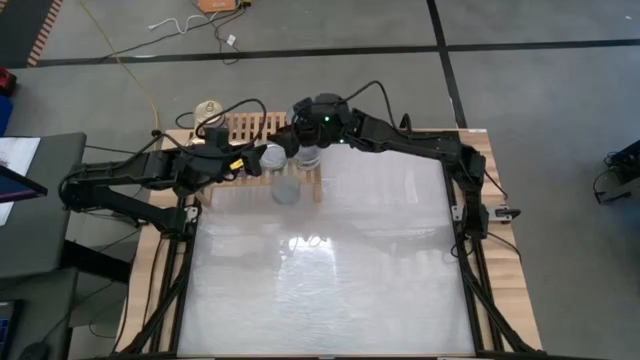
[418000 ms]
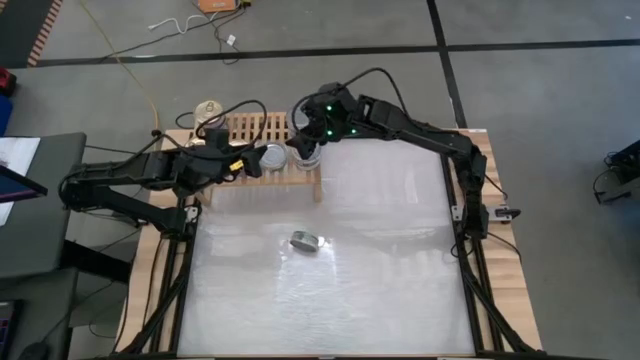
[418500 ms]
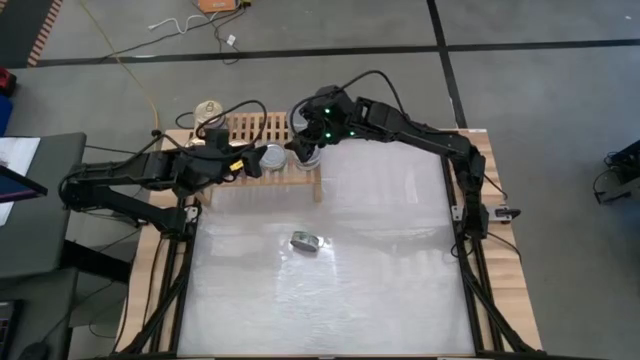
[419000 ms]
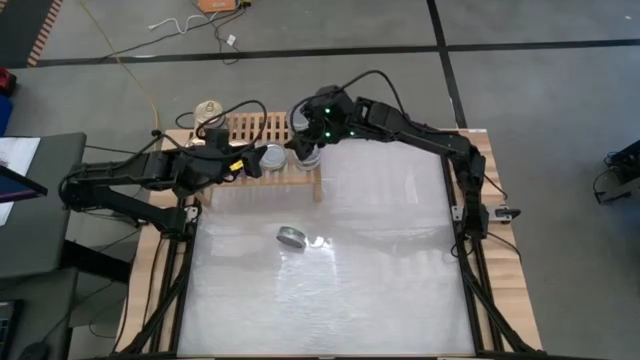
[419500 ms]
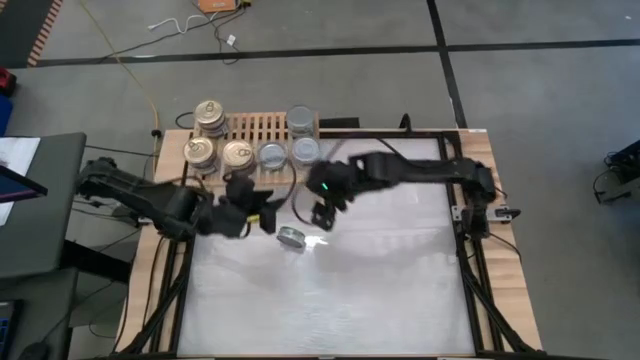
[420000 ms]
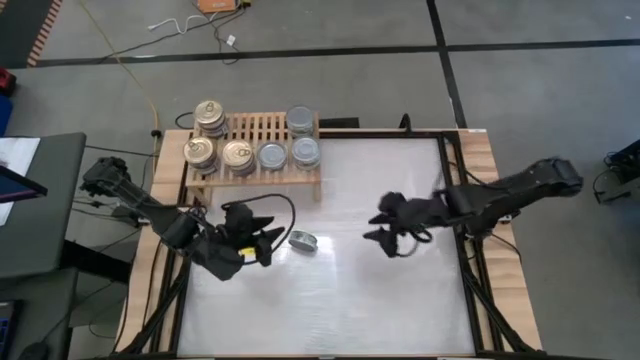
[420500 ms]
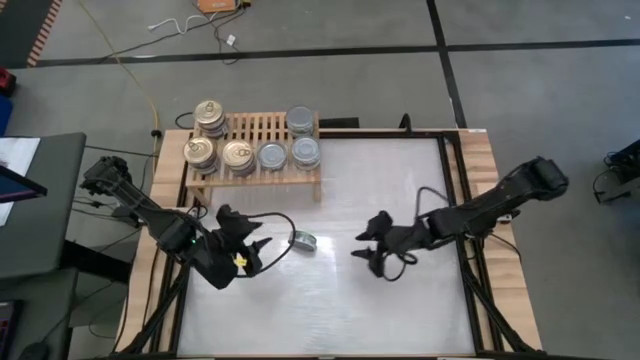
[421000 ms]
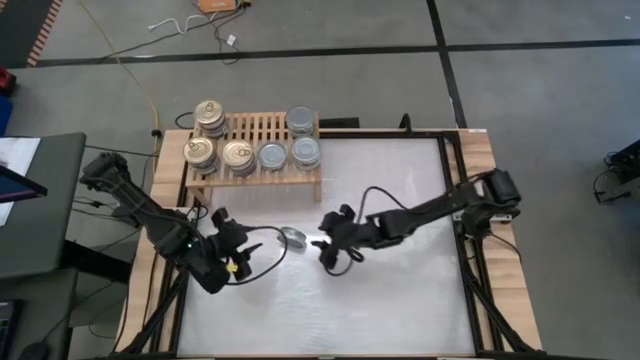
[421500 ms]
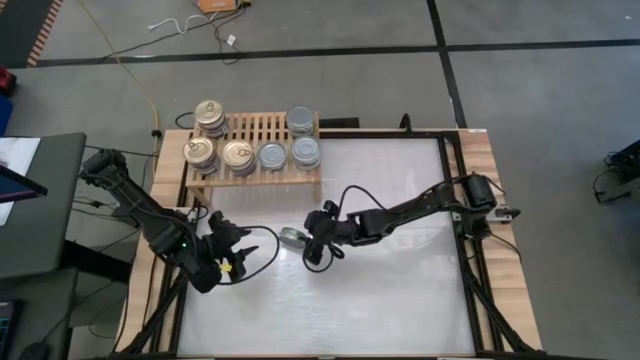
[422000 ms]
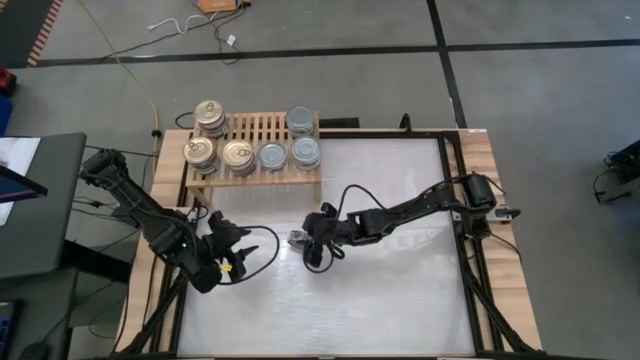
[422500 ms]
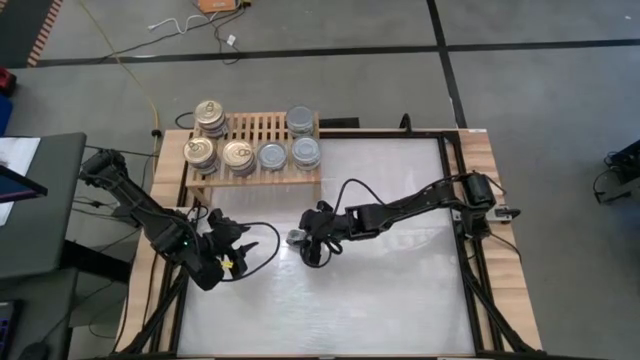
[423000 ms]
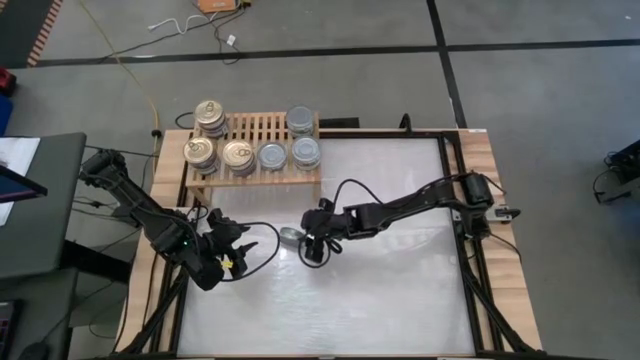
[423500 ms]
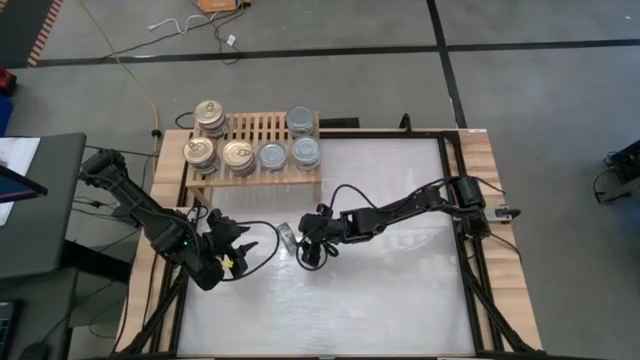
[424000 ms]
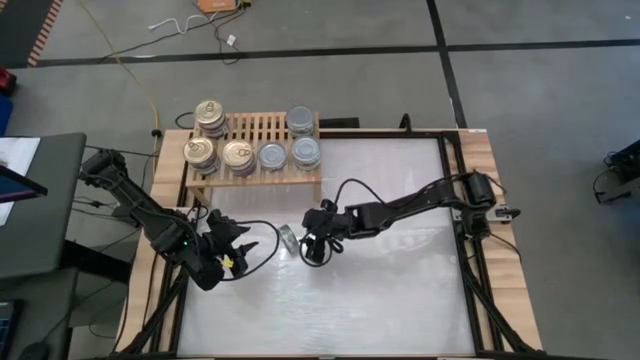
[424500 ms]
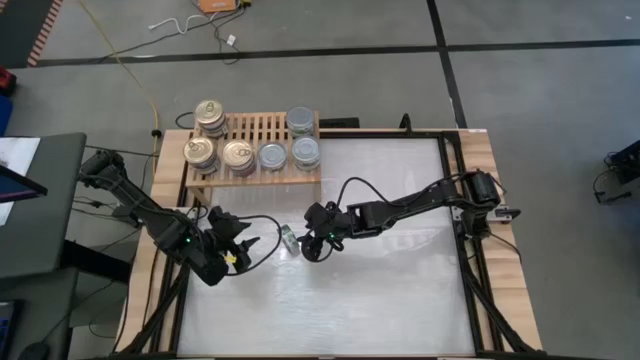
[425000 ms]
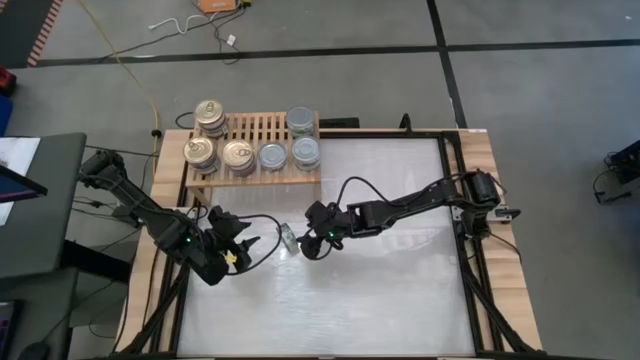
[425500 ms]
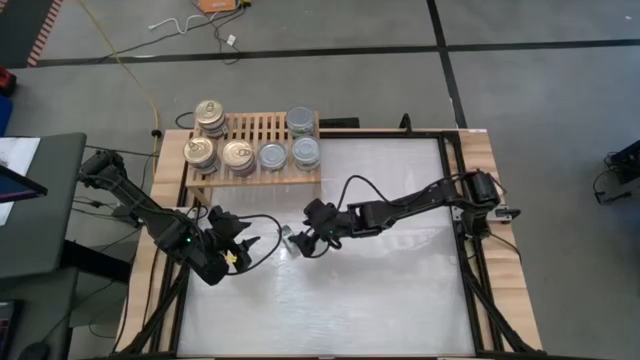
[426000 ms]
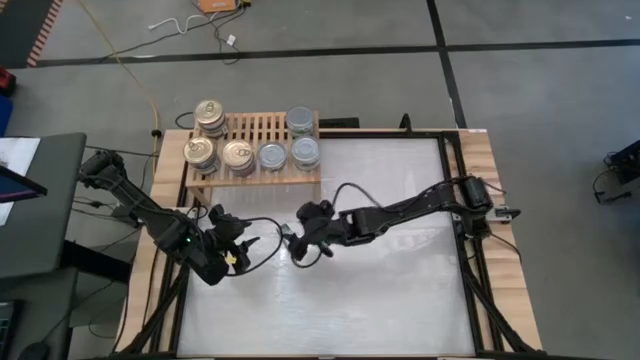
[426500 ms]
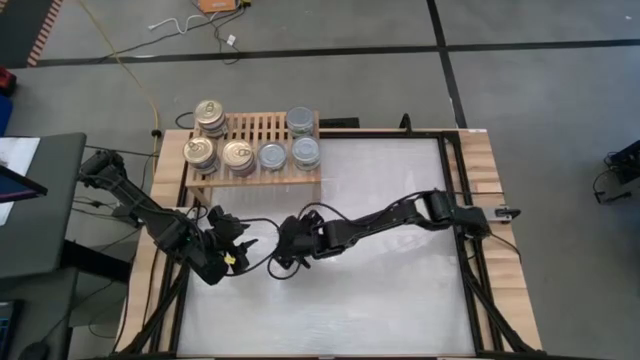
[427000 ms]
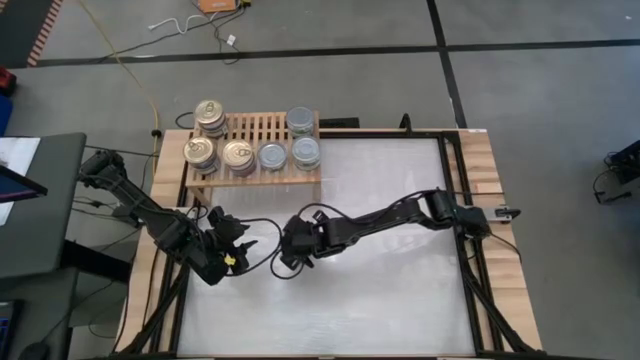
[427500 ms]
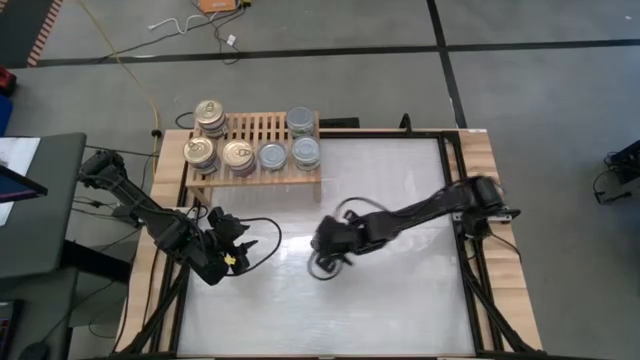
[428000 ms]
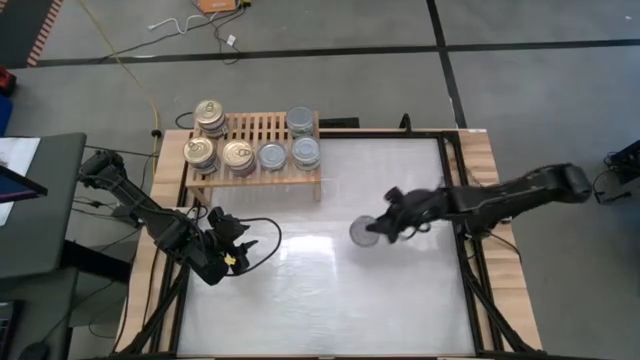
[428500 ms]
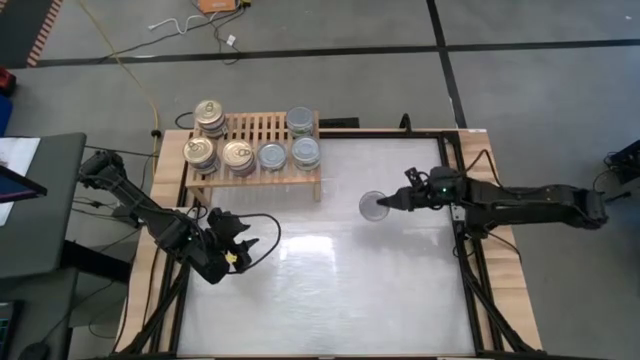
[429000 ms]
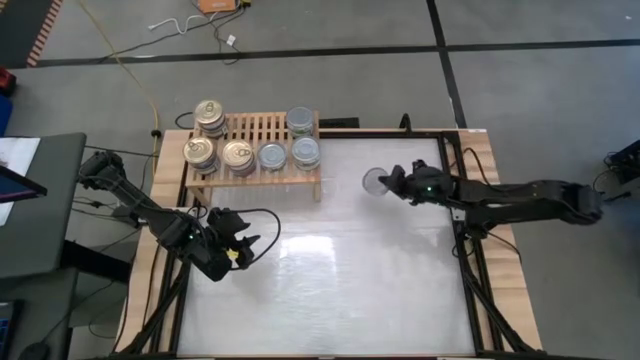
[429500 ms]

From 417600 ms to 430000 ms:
Task: Stack canned seafood by type on shelf
Stack the green tuna can on top of the bottom left green tuna can on the shelf

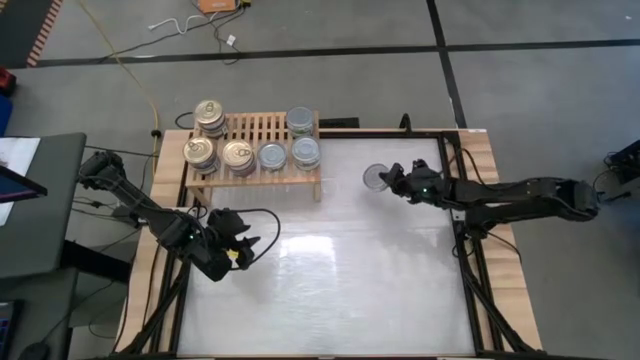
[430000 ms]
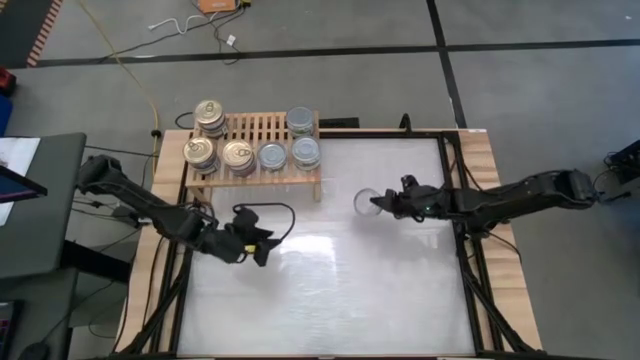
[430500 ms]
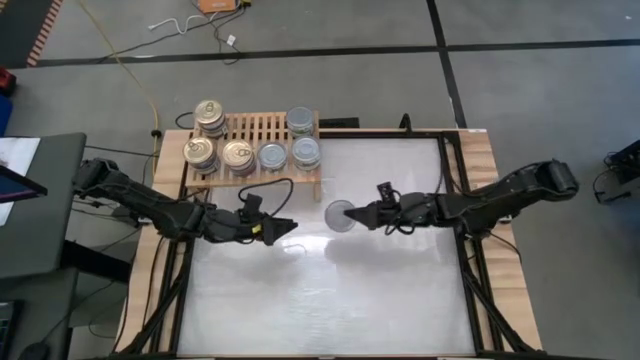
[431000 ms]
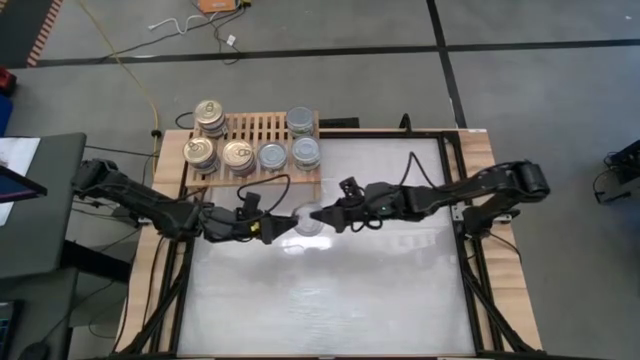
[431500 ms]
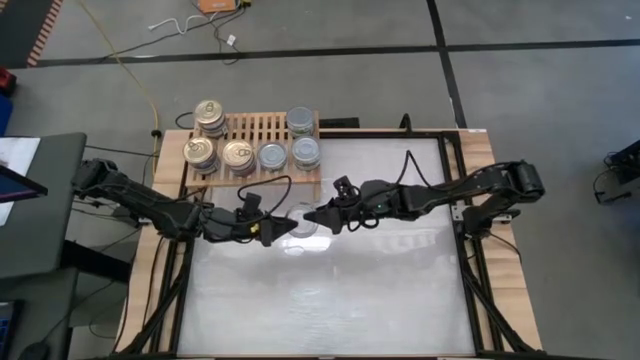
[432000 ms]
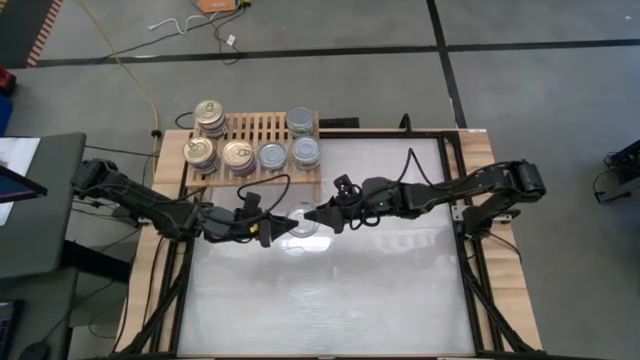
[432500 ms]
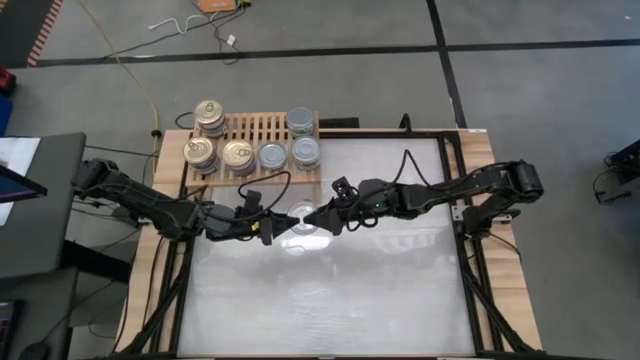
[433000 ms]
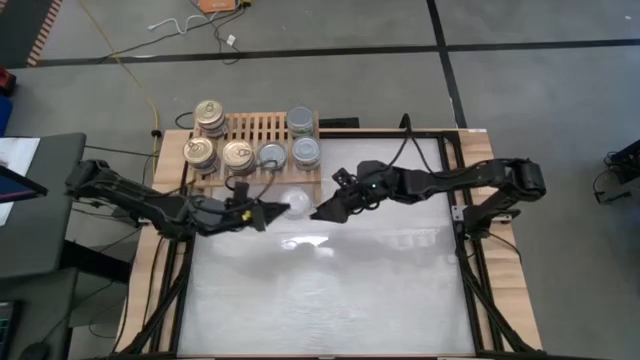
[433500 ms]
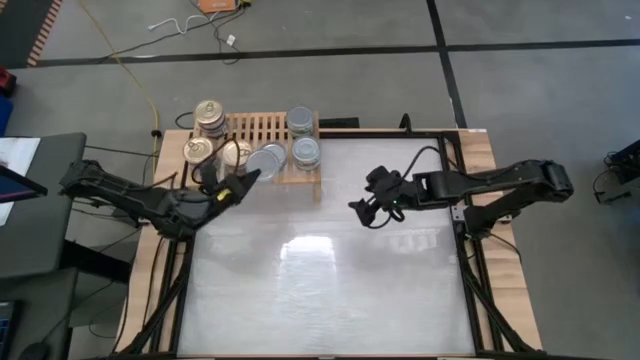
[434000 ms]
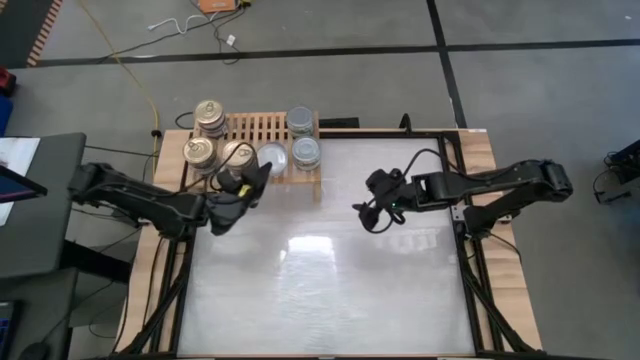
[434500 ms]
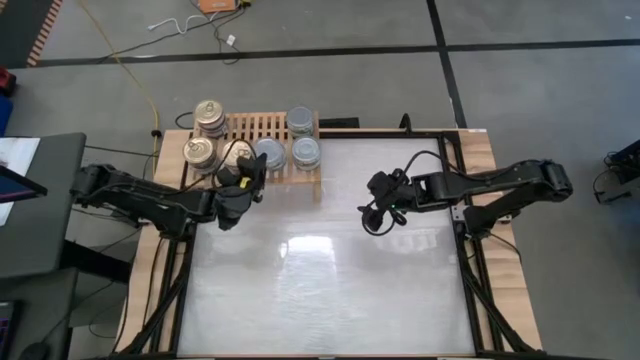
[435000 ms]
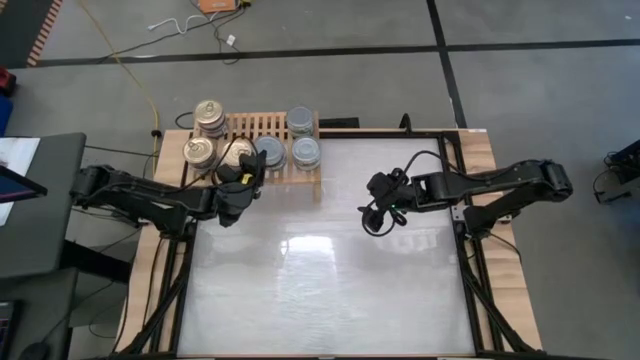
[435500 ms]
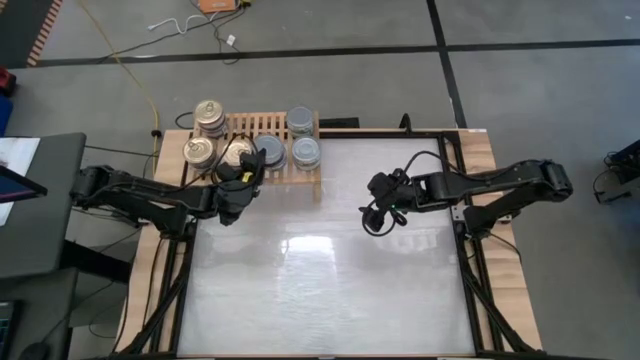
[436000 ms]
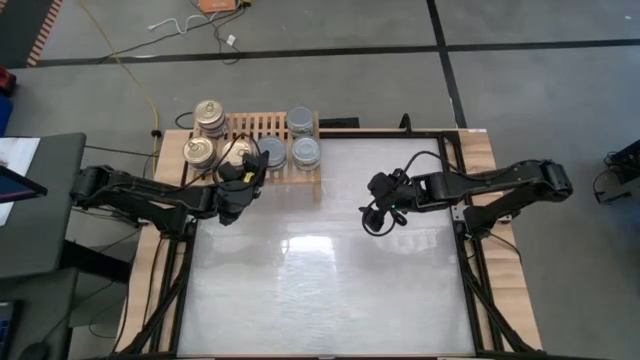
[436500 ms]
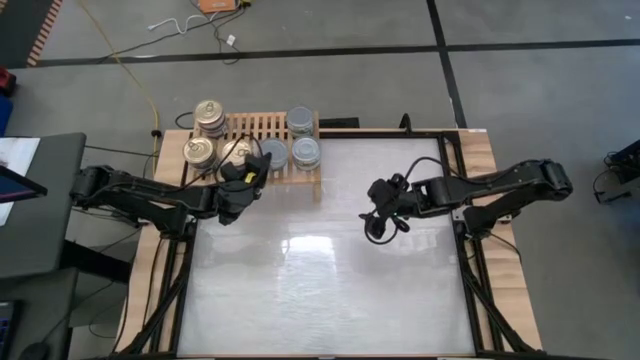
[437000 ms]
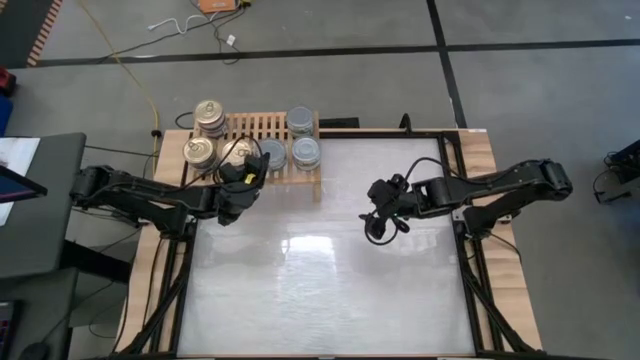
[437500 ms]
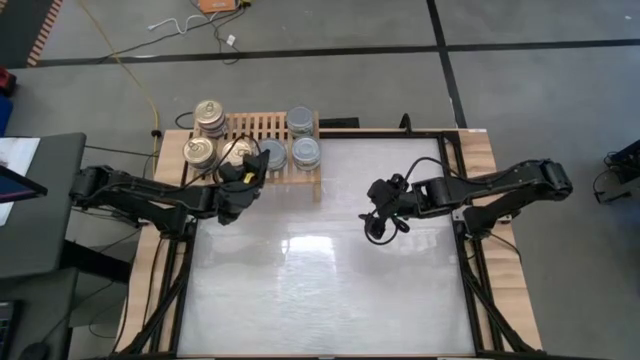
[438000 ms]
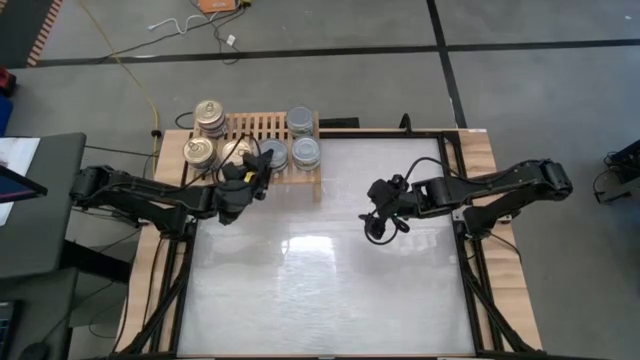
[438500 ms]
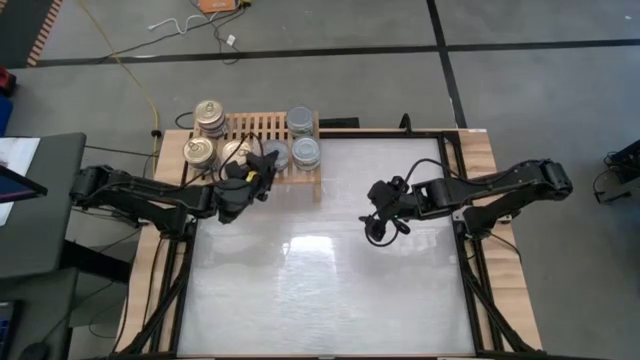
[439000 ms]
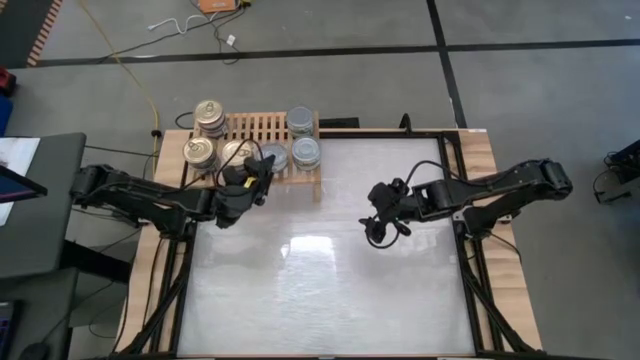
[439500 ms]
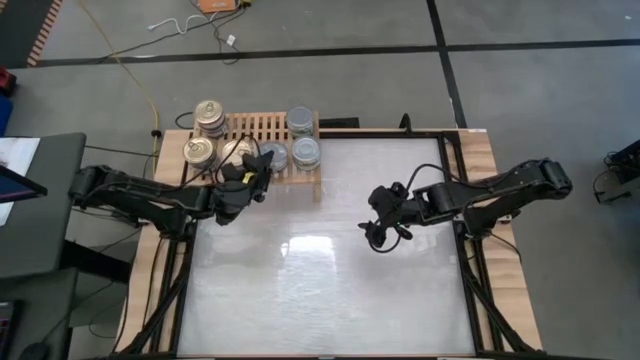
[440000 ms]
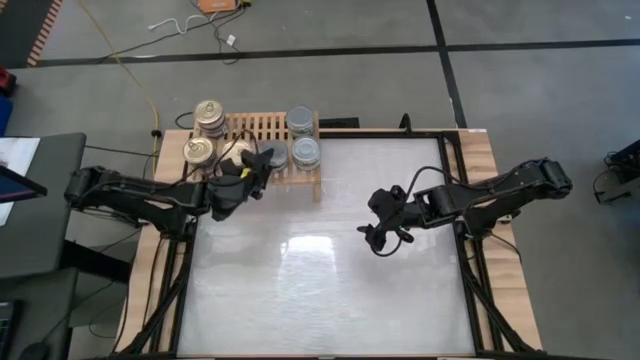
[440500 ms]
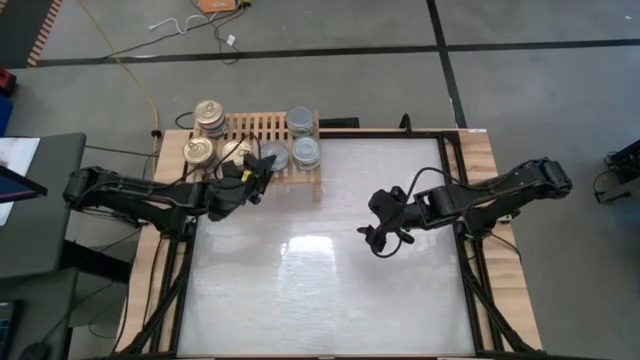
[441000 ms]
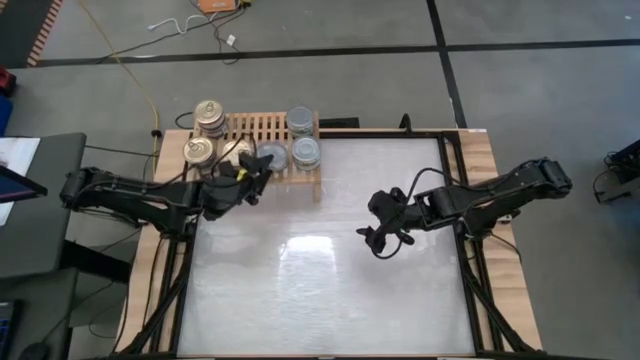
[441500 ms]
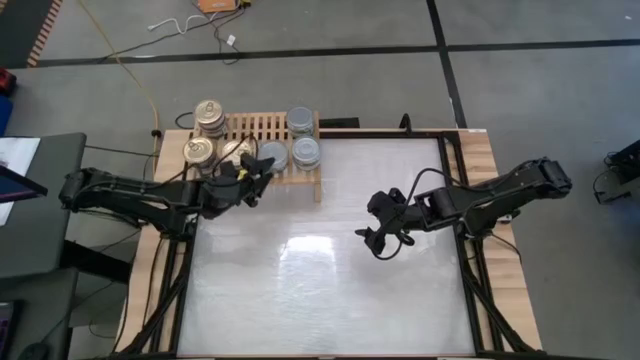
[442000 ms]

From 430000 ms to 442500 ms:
Stack the green tuna can on top of the bottom left green tuna can on the shelf
